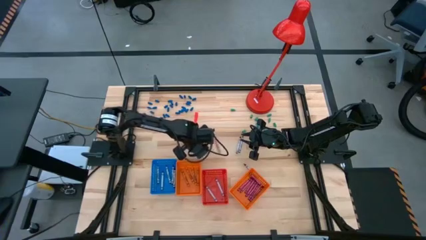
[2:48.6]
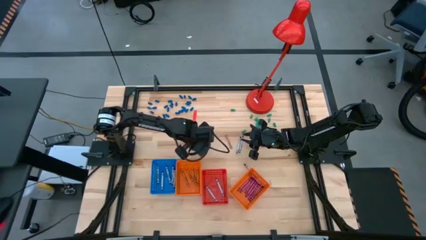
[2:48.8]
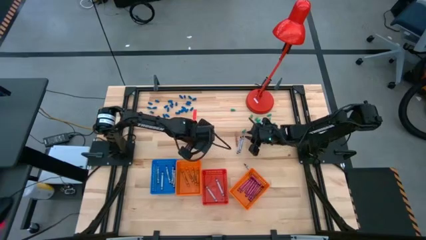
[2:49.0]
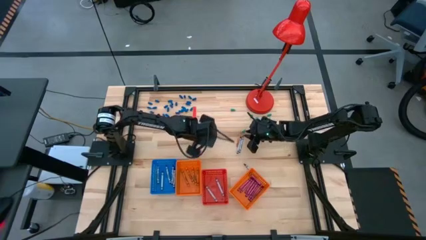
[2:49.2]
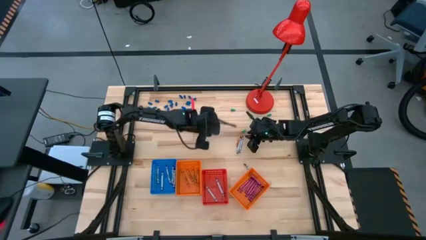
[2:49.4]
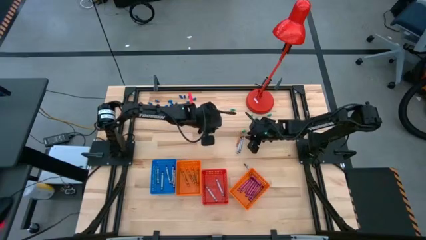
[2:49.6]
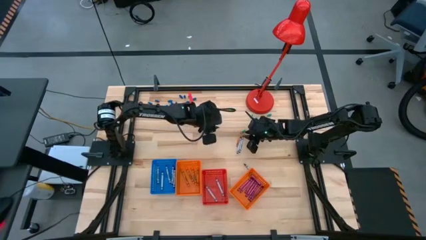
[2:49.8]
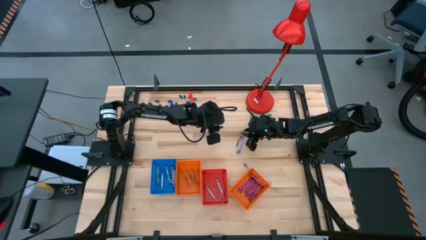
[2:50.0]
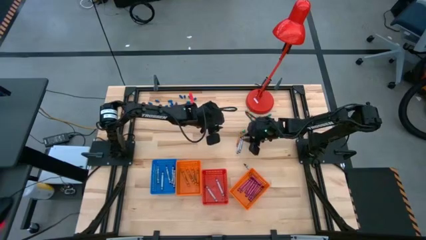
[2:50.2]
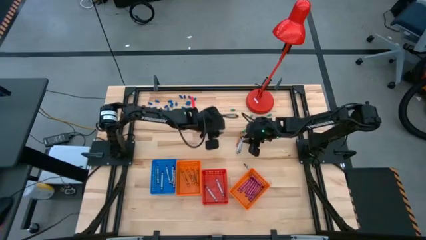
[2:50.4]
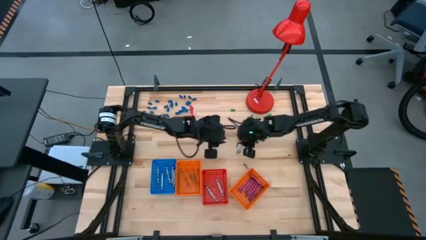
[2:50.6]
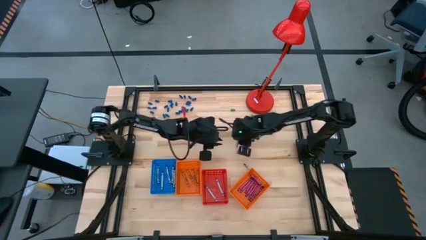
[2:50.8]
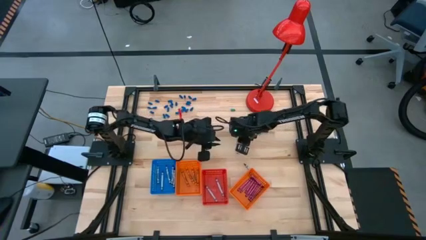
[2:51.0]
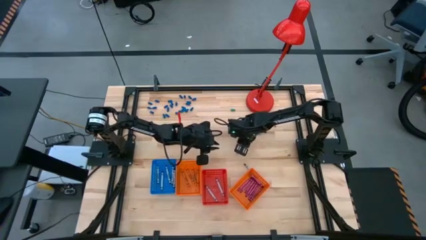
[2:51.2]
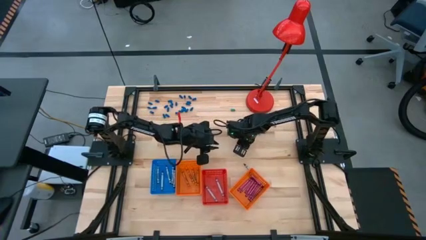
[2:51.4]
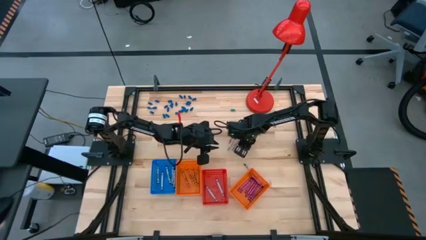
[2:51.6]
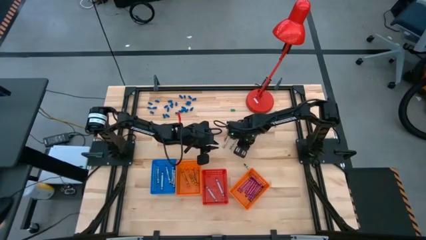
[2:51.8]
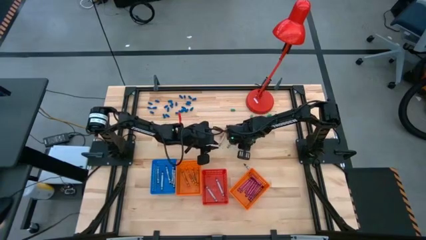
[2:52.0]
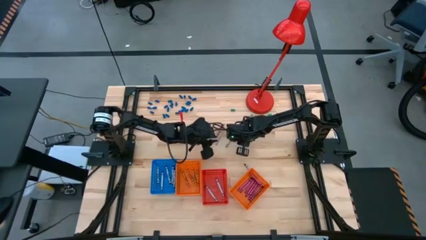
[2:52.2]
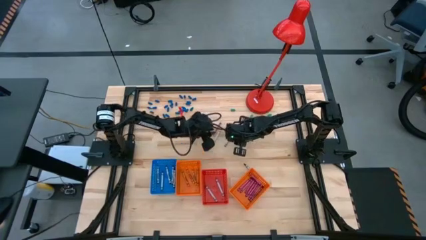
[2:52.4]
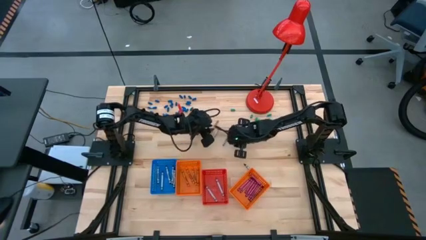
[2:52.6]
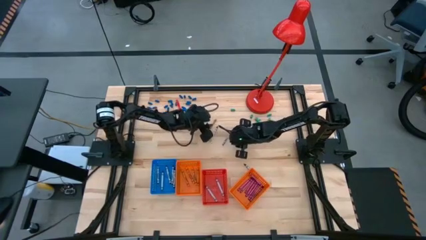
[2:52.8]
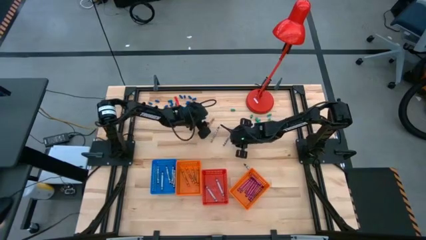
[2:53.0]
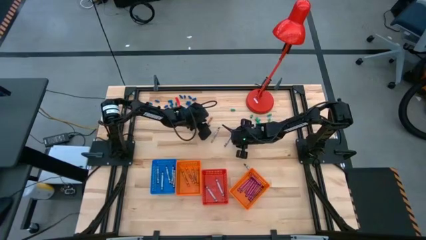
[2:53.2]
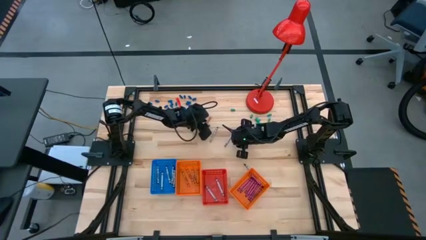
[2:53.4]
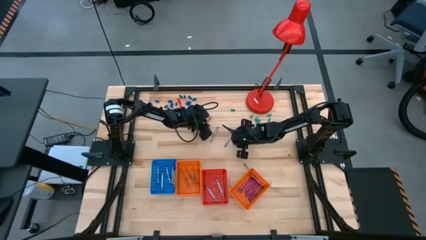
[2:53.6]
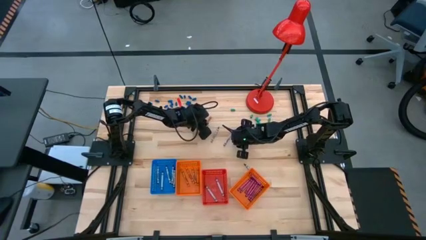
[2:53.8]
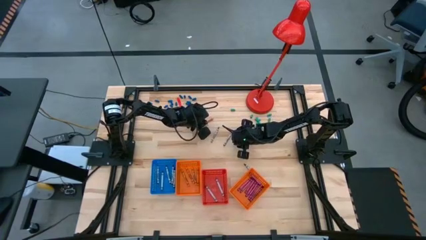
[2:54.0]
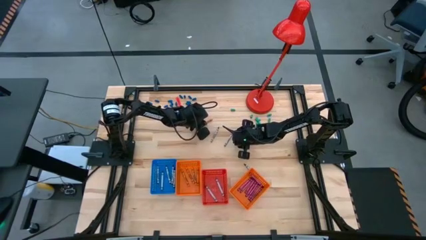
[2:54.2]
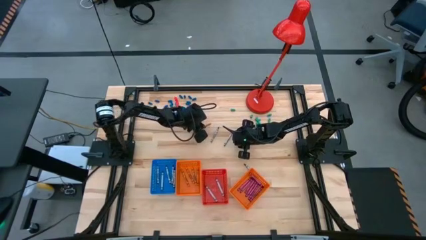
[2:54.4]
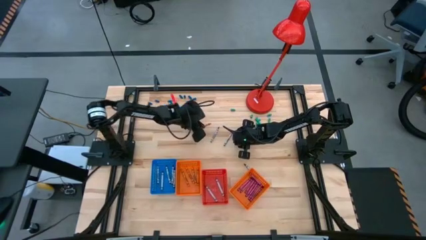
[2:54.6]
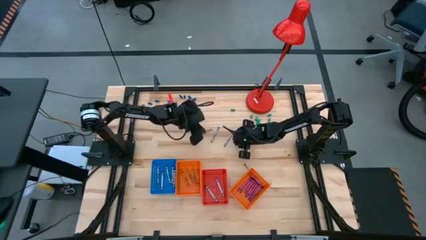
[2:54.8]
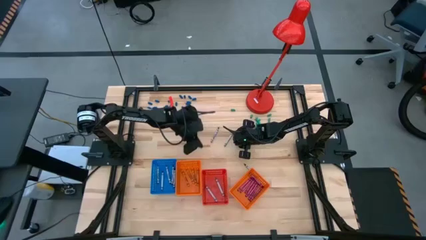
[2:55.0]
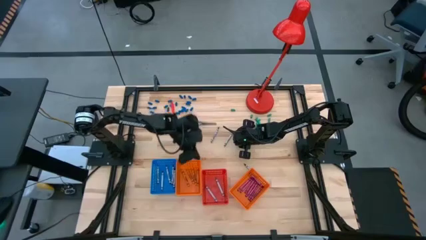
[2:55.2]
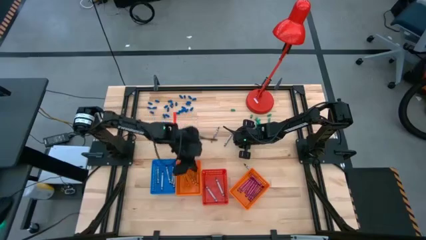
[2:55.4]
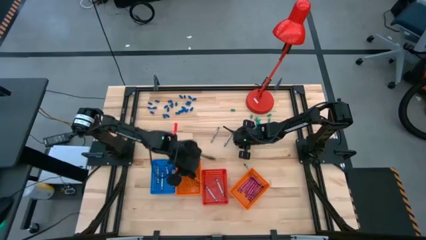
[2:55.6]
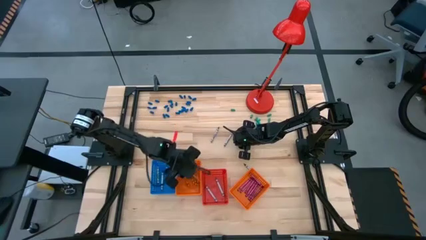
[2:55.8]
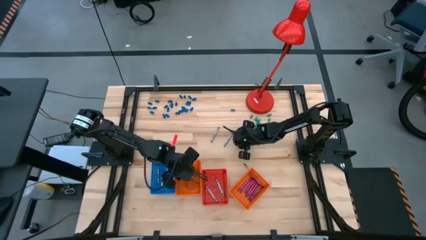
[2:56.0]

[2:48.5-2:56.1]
Task: Sort crayons
Put the orange crayon into the left orange bin

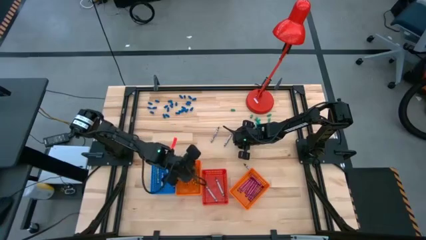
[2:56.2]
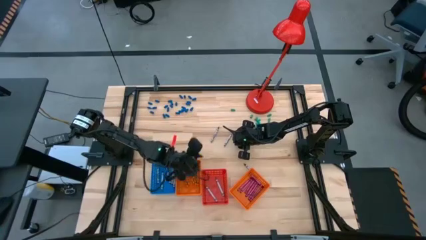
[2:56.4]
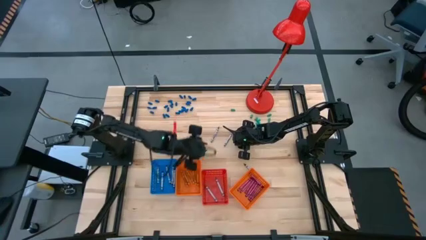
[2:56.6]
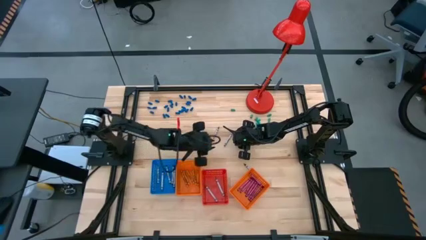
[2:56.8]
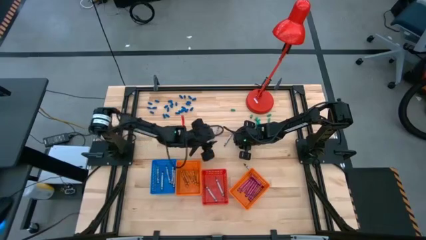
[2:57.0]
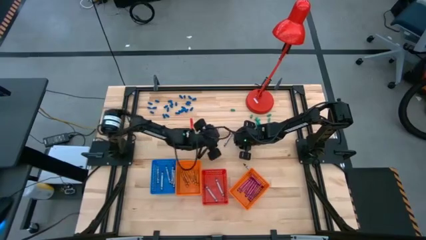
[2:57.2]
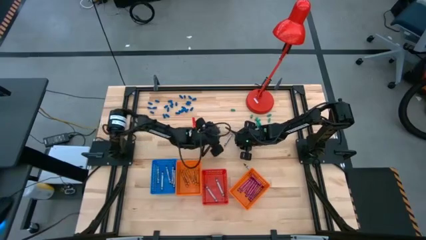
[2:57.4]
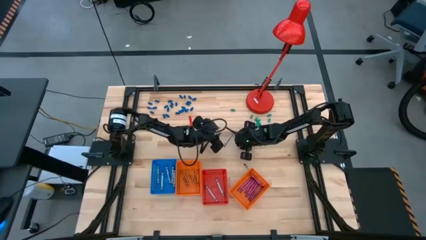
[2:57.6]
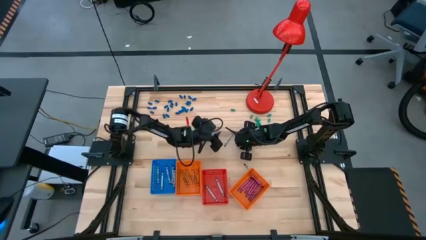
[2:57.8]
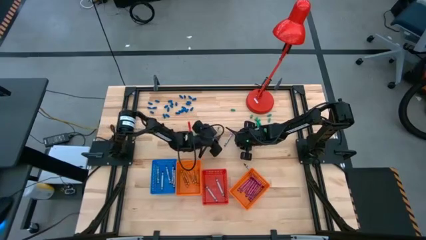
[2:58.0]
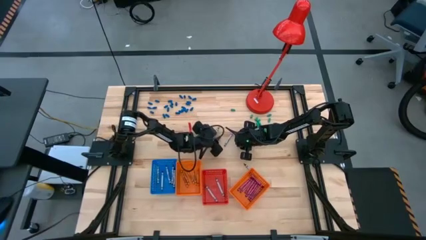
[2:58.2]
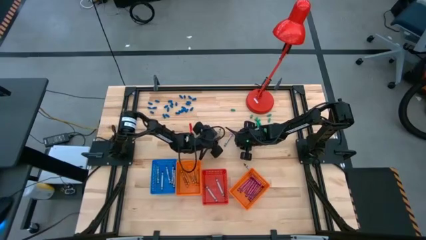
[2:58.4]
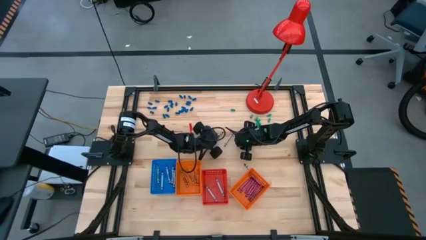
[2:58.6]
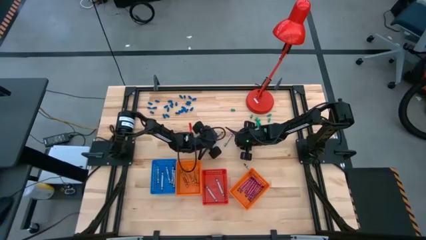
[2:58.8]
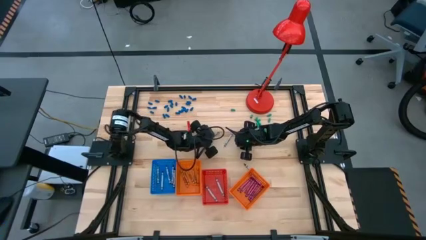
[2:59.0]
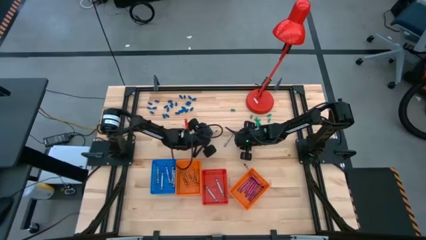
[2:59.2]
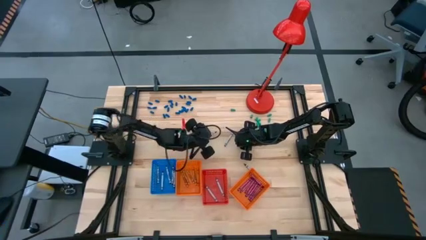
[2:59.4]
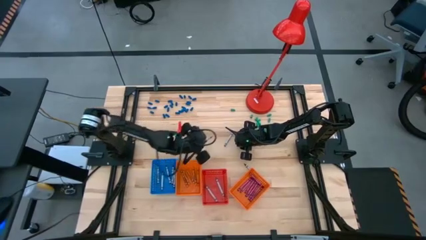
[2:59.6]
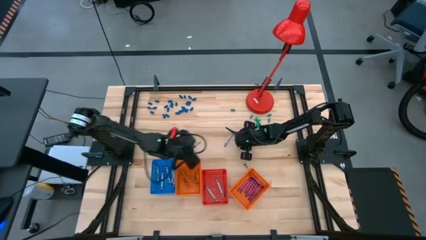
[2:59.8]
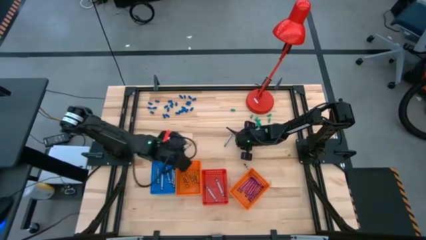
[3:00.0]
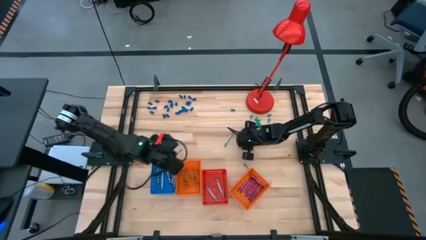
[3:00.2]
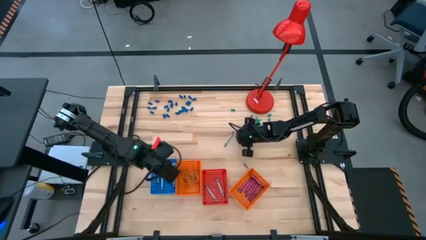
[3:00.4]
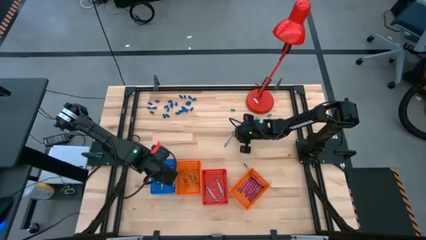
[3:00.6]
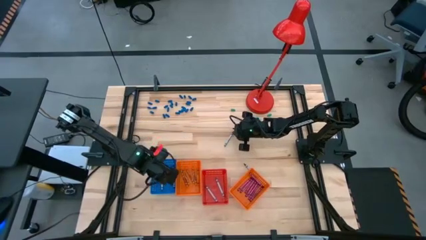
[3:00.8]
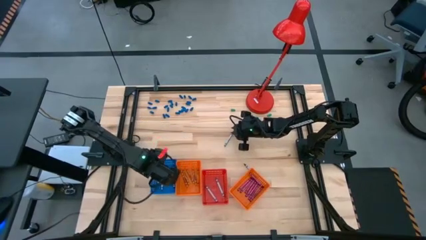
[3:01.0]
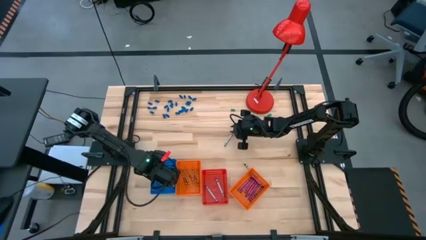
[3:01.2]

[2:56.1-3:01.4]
Put the black crayon into the blue bin

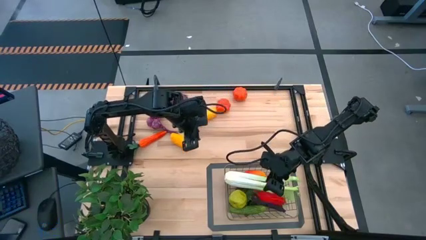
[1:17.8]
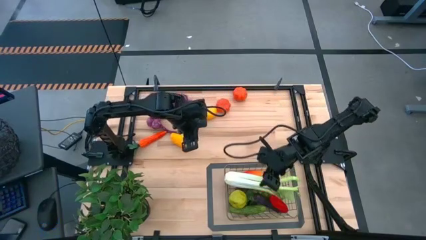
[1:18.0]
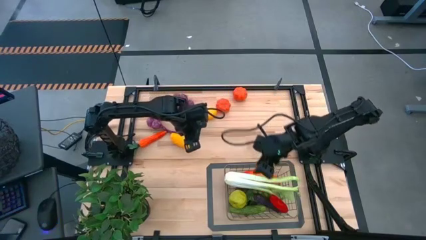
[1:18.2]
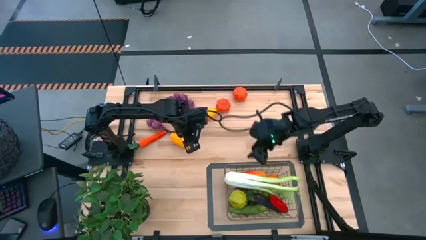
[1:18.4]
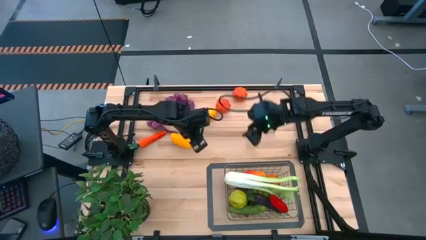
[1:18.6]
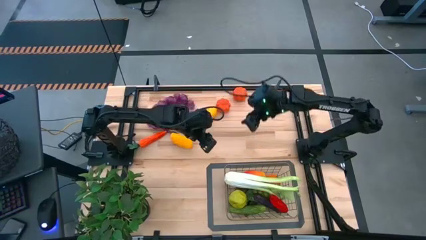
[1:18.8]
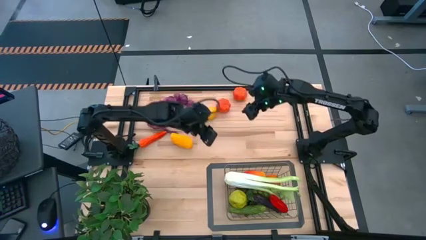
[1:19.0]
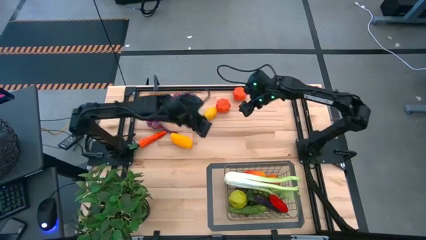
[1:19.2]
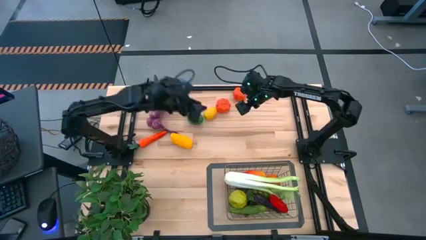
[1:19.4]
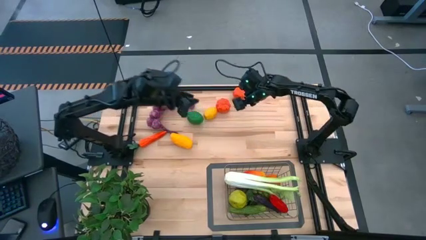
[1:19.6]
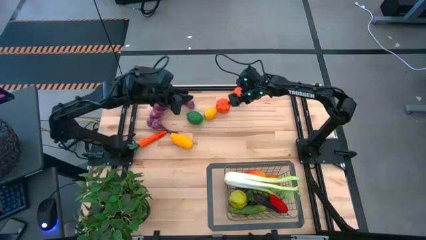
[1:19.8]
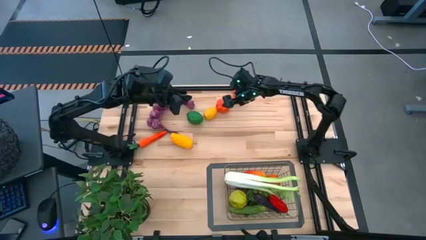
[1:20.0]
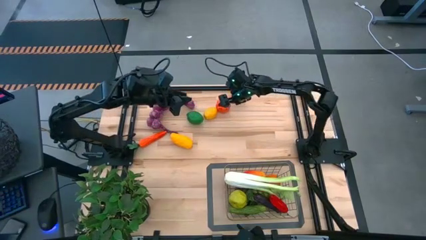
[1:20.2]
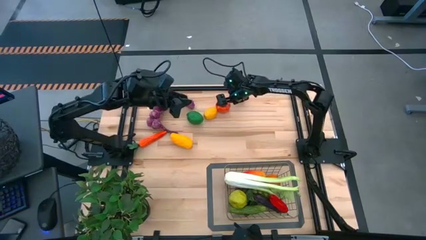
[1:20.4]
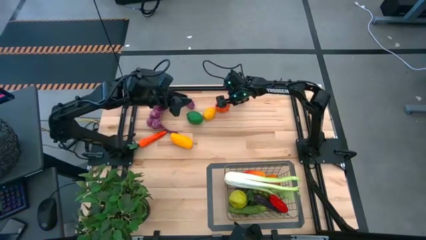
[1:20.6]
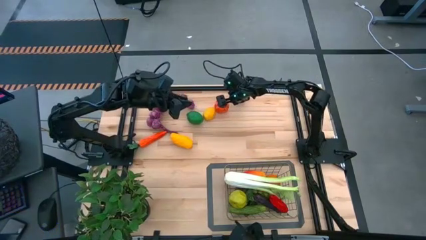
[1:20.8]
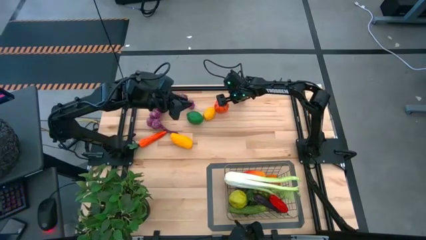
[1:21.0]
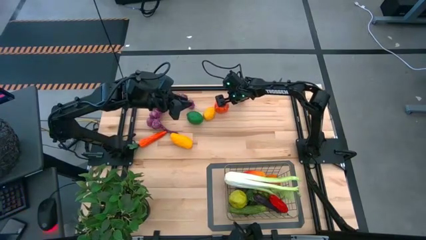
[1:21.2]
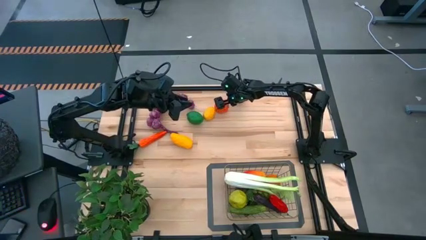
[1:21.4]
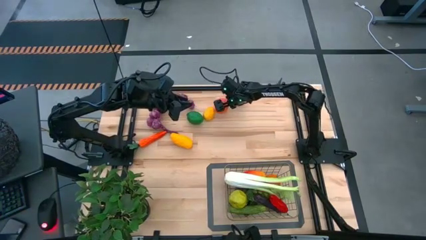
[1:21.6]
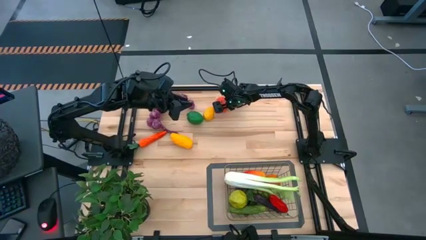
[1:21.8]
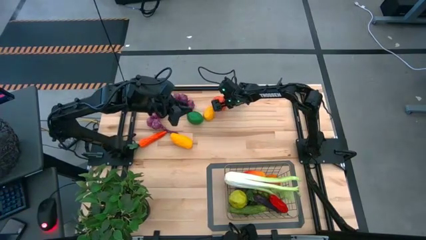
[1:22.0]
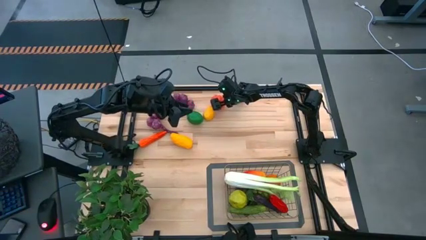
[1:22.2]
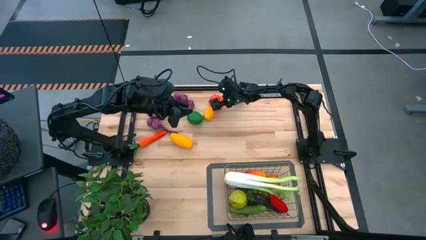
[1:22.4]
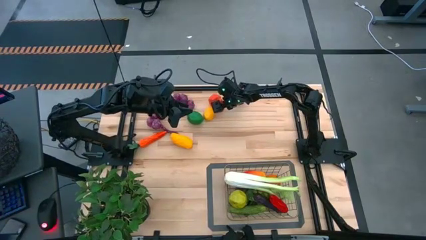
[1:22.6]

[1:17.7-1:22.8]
Task: Build produce basket
Put the tangerine into the wire basket
